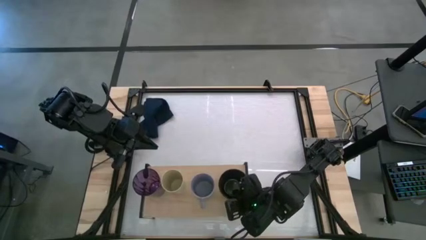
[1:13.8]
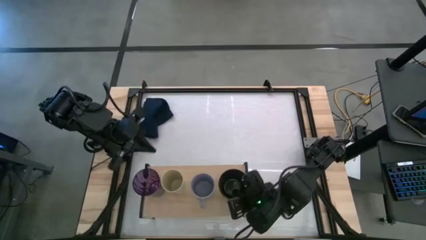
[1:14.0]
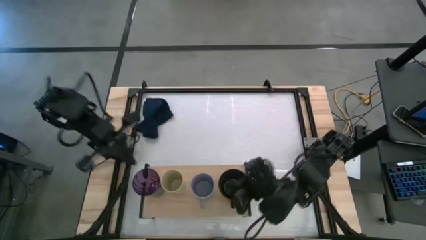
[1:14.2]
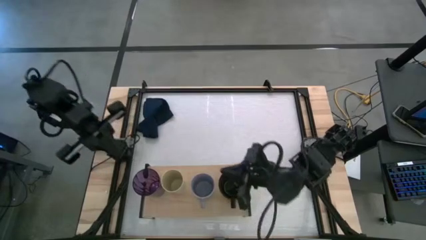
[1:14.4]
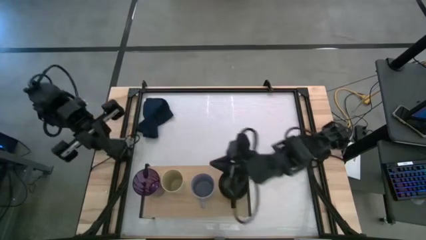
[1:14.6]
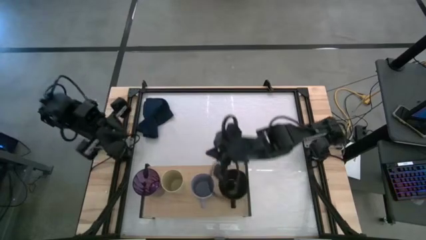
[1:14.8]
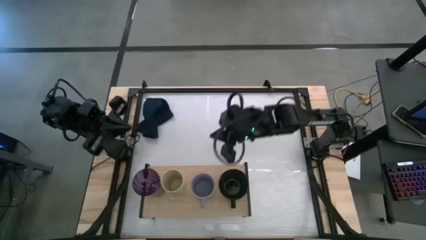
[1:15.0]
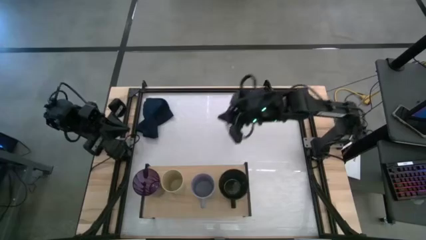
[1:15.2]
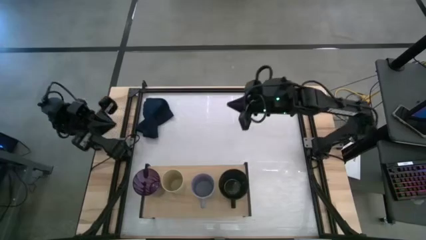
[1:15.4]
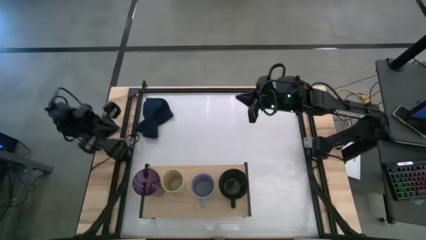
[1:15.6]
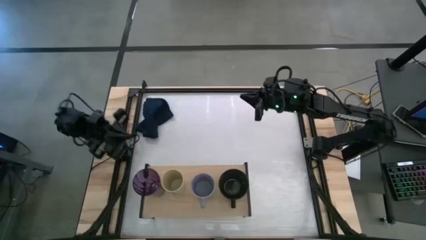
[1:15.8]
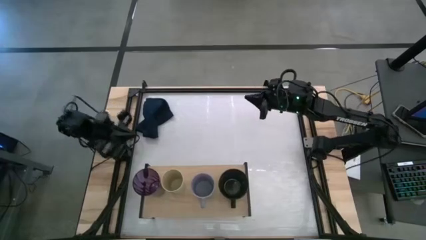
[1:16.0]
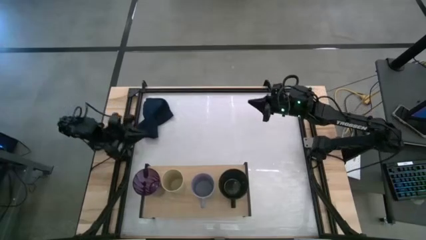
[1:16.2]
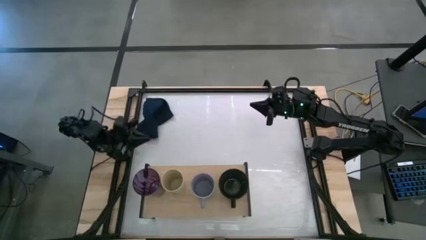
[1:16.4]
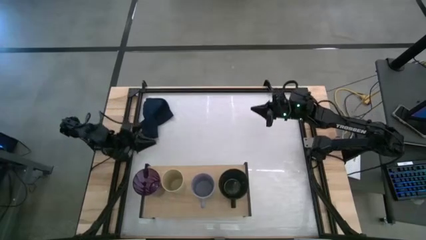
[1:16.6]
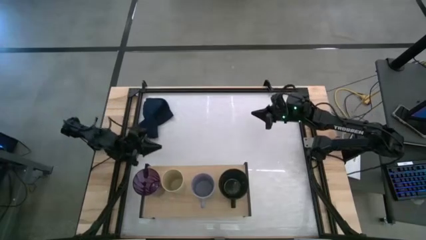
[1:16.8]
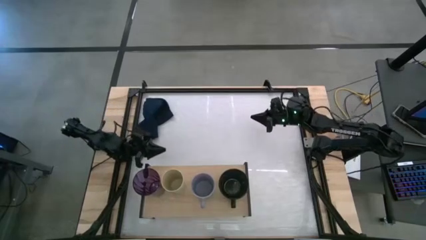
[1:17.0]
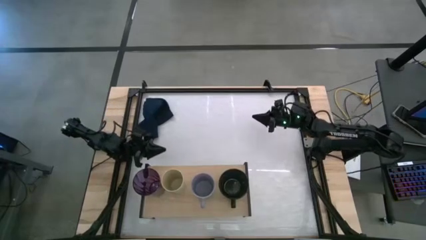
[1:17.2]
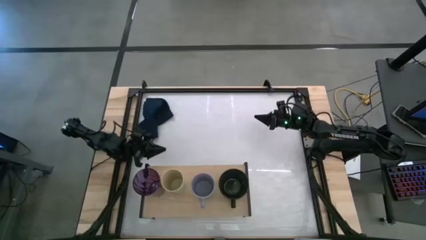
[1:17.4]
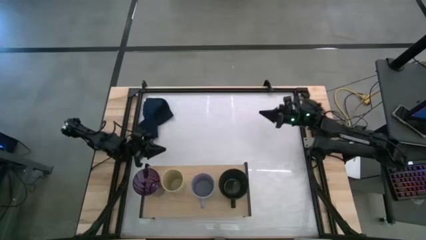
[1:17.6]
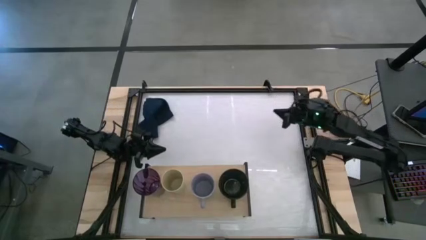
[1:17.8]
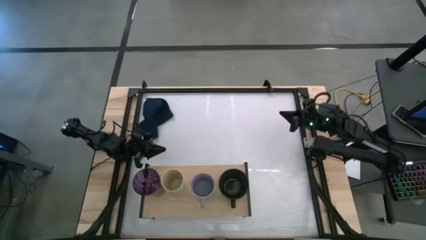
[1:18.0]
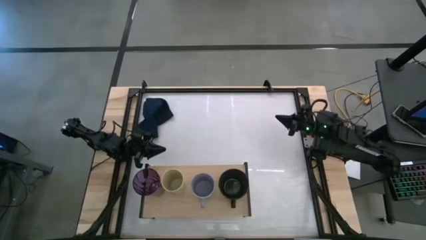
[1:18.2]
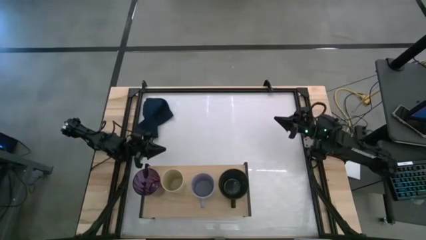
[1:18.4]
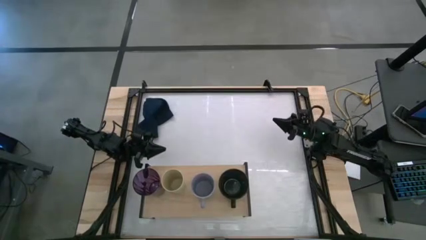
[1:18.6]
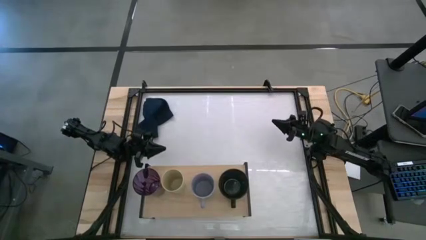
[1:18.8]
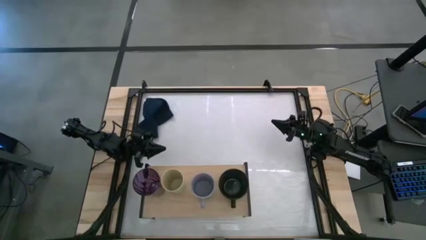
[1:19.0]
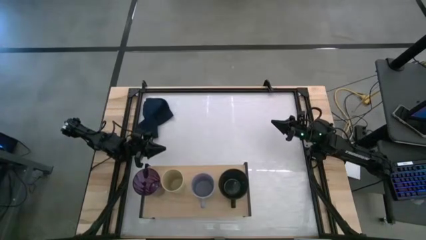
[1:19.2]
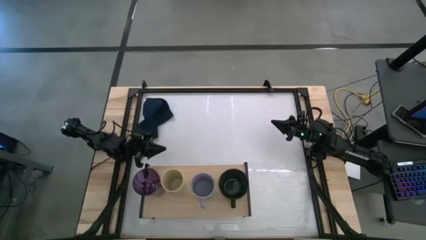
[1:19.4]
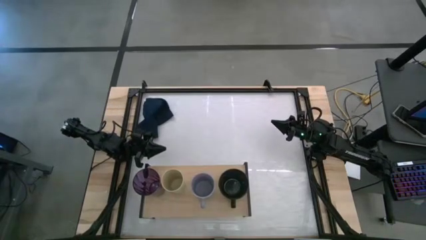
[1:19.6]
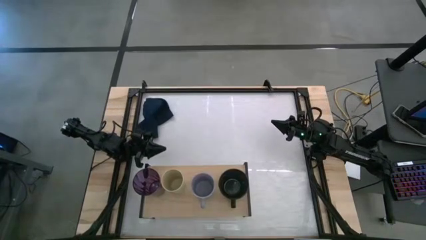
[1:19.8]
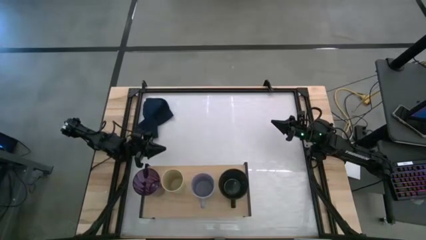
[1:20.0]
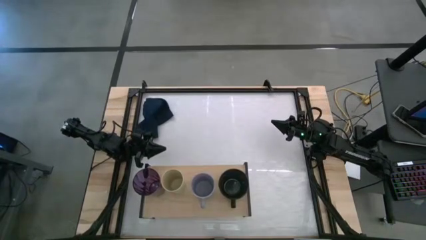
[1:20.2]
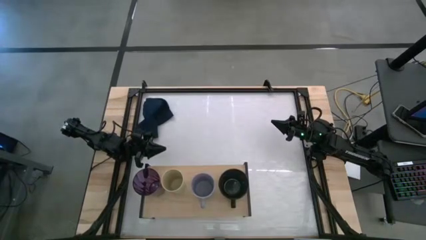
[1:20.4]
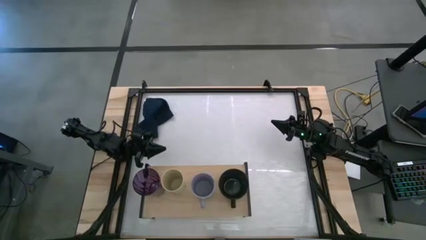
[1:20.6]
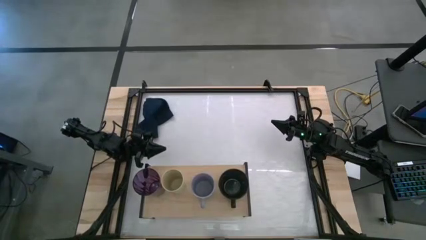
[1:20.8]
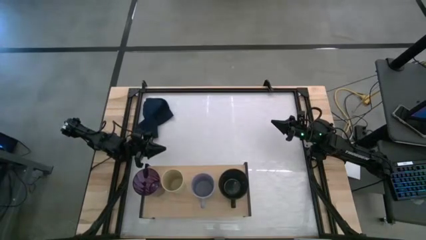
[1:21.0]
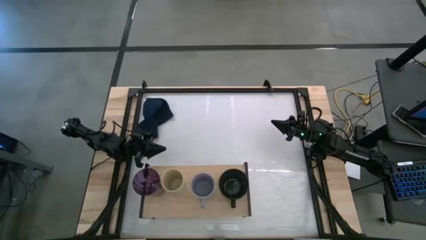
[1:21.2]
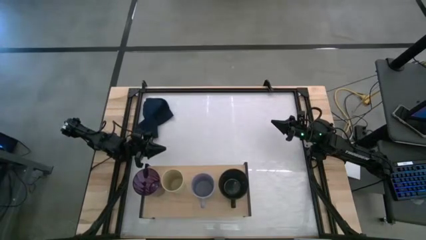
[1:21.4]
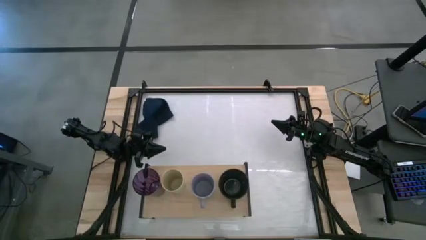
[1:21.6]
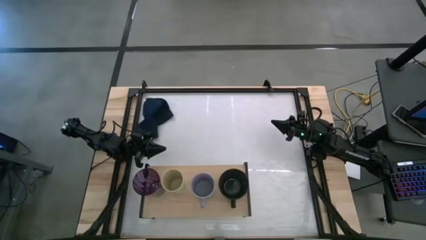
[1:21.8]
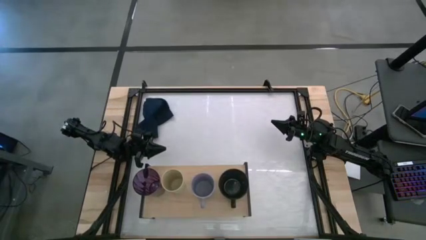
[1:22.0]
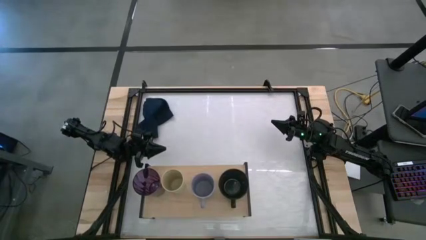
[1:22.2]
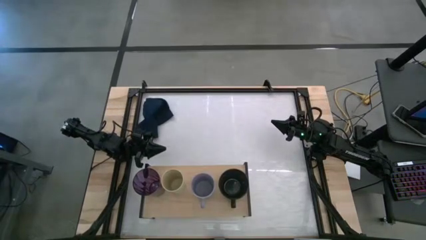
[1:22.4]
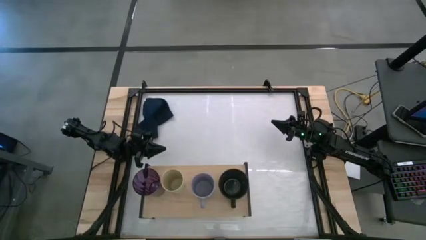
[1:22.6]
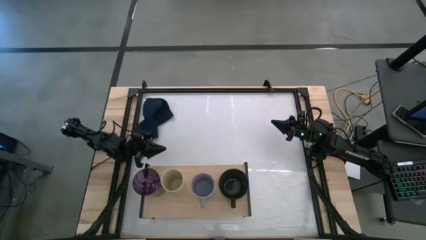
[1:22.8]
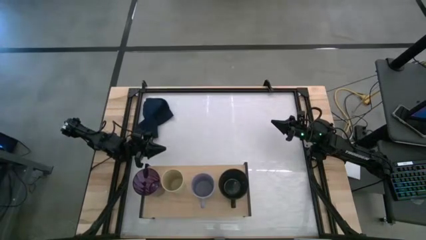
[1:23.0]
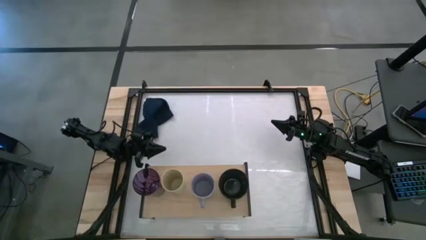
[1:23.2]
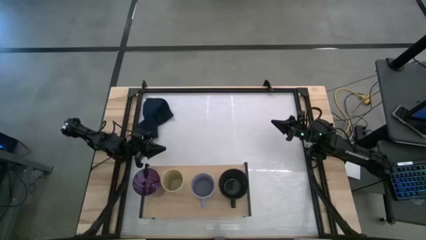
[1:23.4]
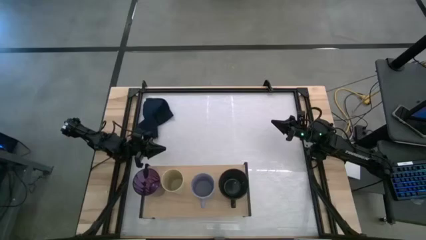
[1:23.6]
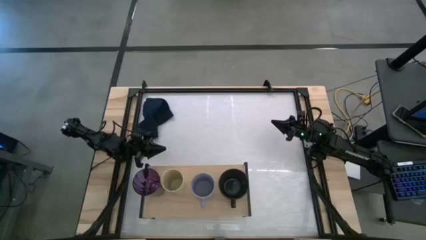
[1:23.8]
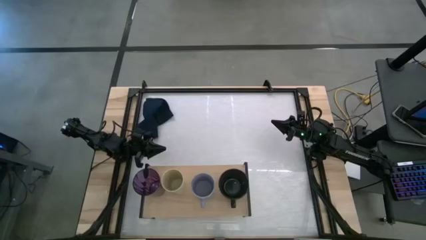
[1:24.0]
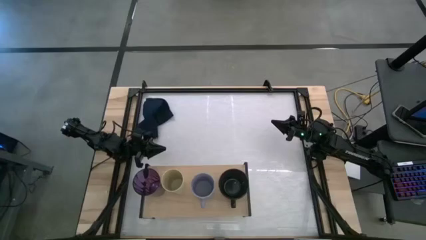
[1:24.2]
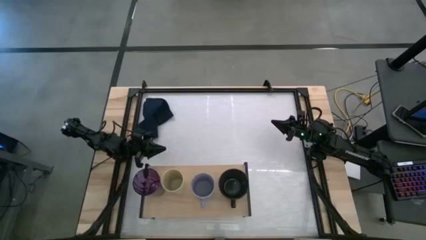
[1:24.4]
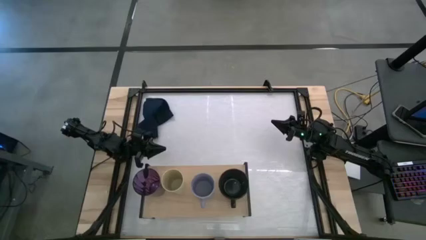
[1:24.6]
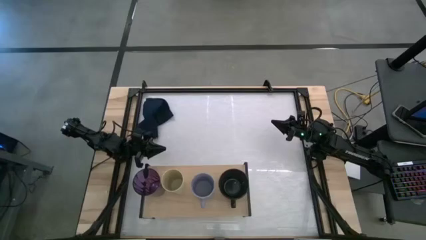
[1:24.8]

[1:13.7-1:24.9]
Task: Stack small to large cups/mugs on shelf
Return to Home Position

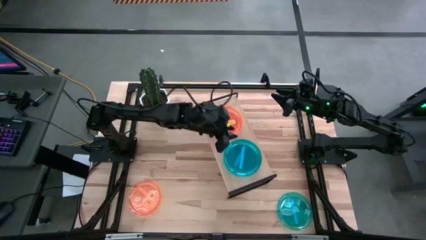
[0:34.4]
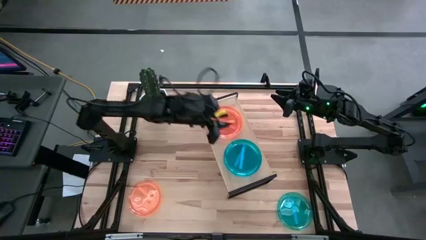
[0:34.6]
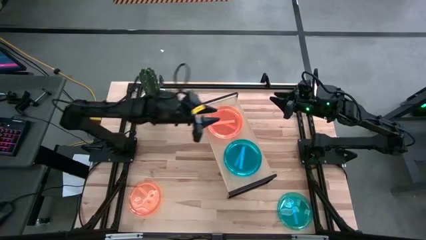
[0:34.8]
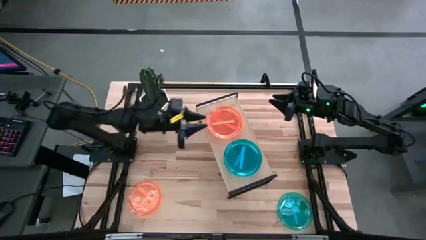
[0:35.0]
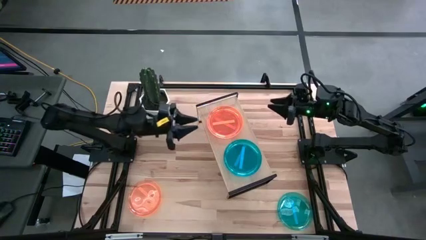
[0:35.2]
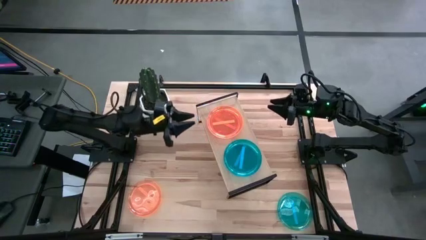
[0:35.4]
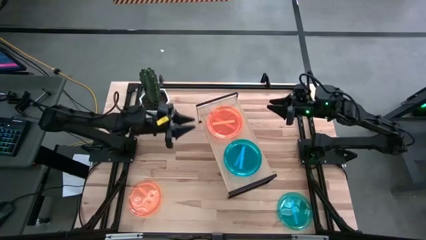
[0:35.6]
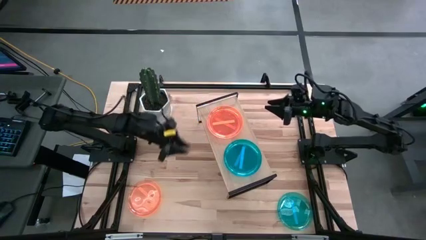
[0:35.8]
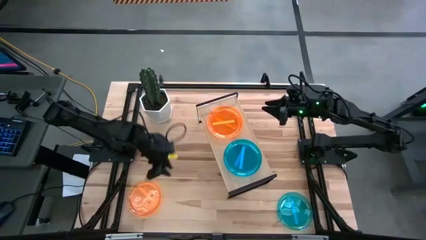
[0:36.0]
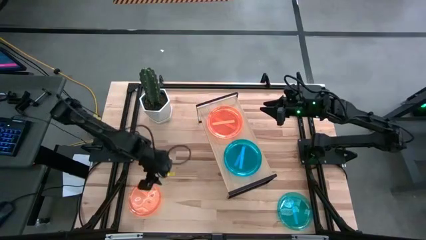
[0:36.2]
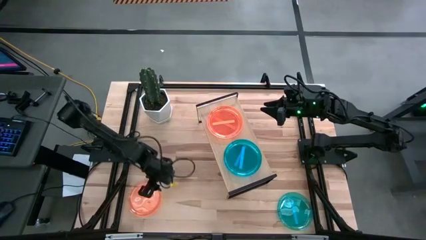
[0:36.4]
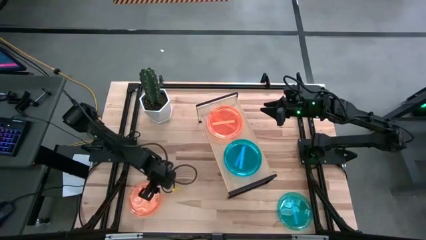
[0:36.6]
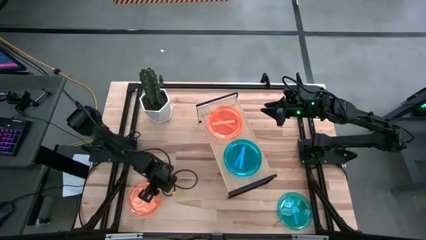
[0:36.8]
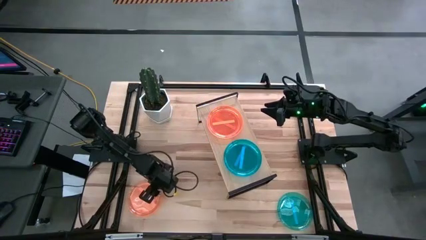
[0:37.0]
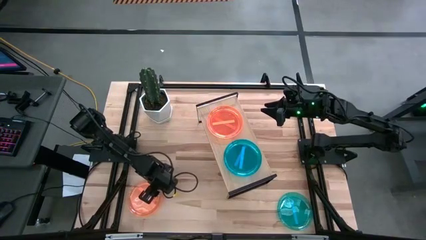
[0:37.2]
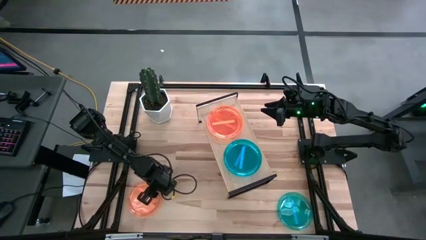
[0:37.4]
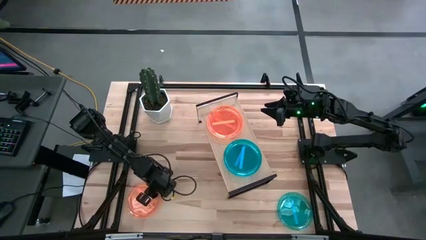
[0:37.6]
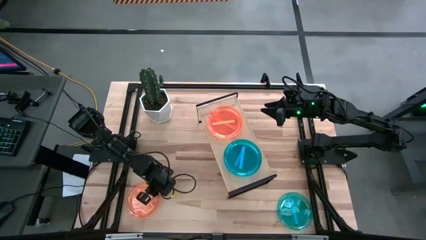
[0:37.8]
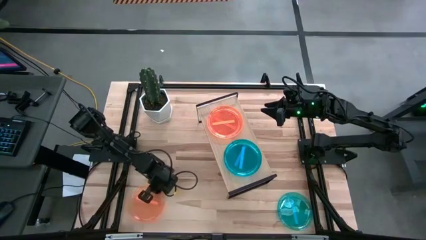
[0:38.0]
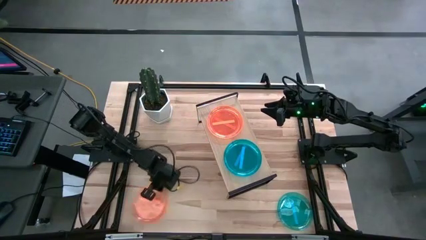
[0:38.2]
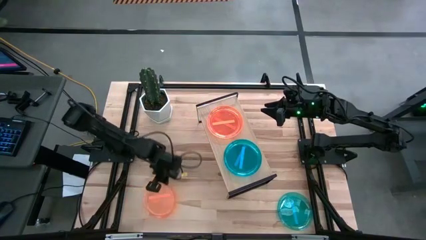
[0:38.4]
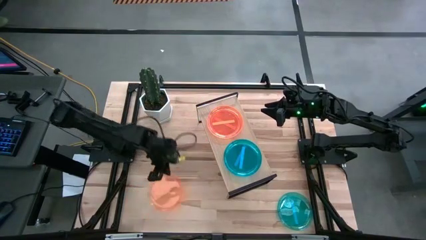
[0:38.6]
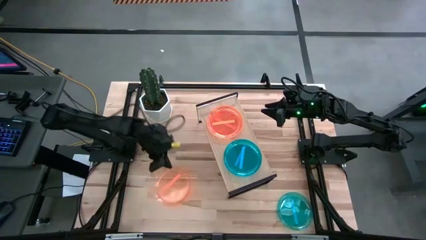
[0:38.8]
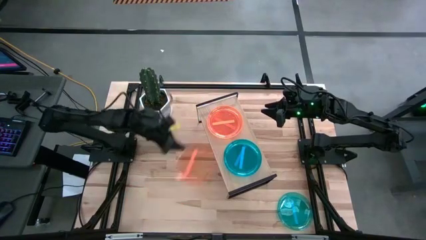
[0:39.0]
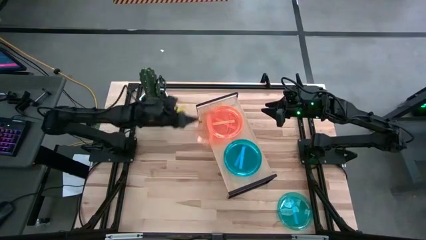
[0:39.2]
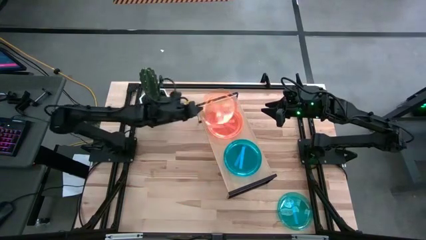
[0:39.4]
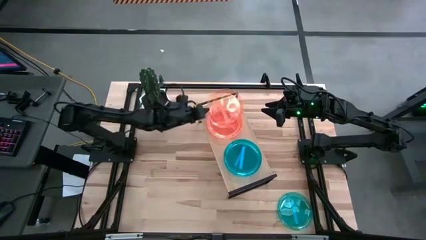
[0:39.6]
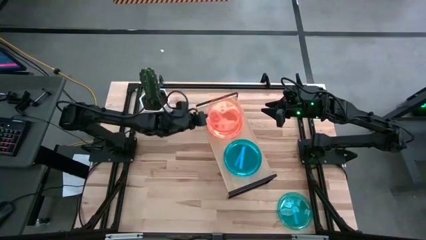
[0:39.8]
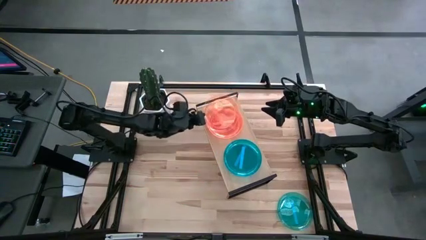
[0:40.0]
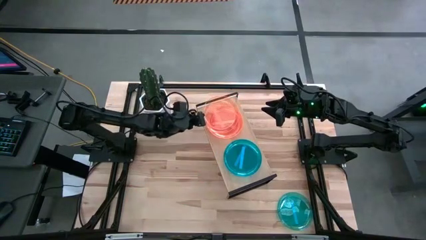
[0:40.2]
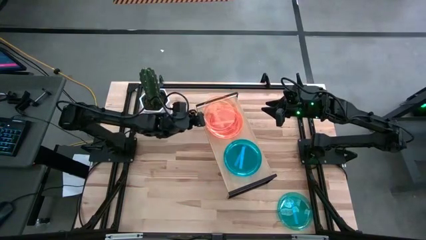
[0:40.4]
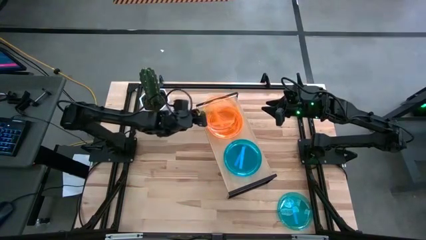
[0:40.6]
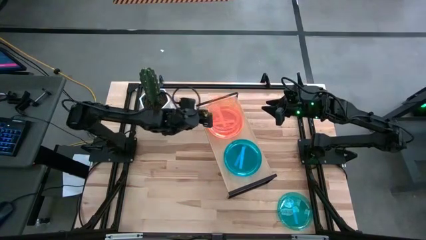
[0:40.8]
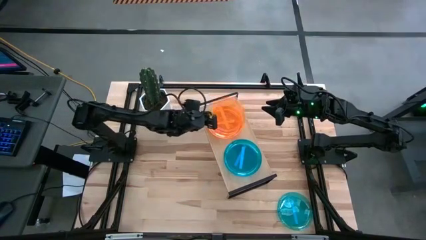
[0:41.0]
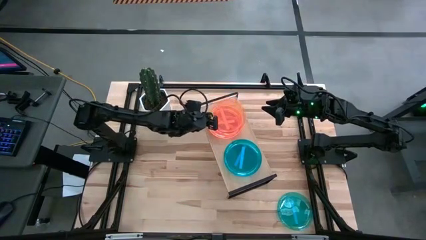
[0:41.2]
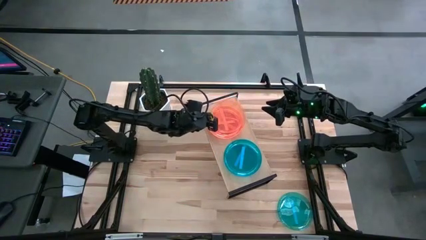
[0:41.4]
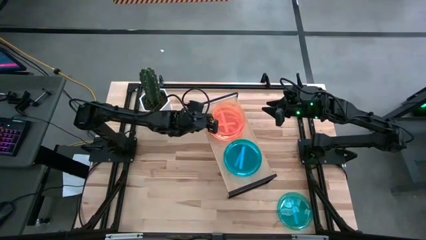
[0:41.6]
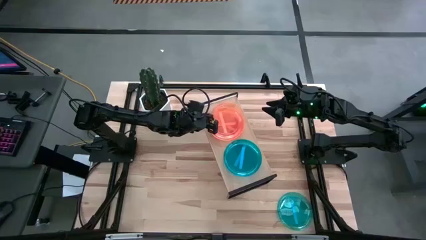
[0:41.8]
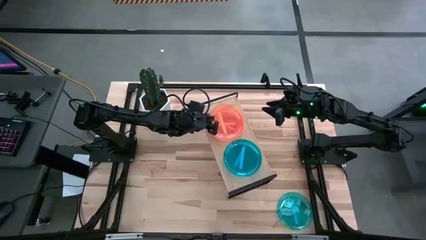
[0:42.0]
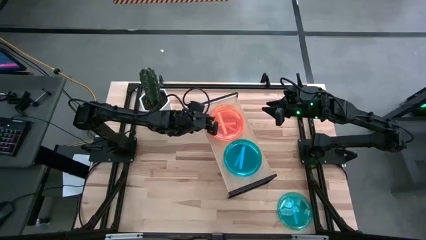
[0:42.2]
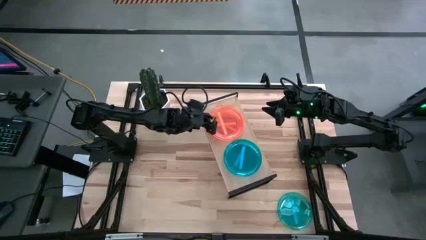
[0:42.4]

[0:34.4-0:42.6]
Task: Place and stack plates onto a shelf
Stack the orange plate on top of the orange plate on the shelf
